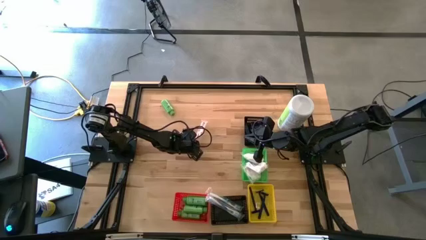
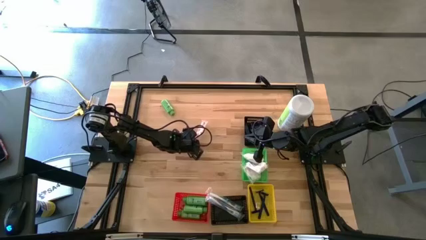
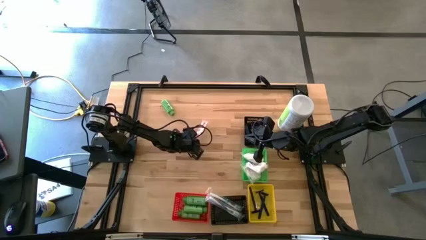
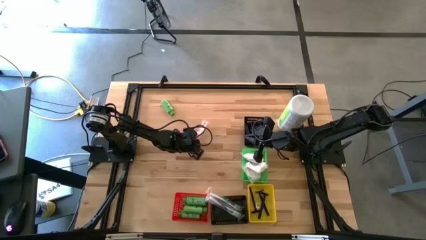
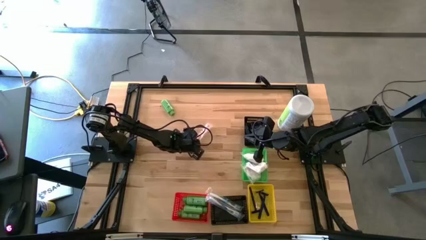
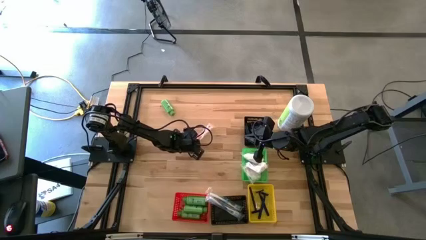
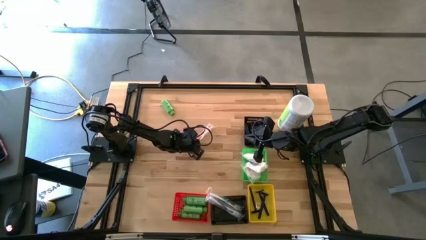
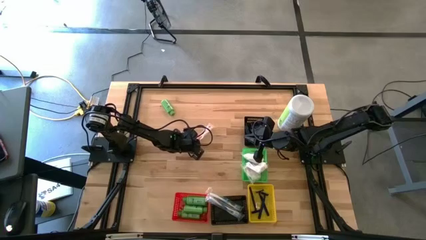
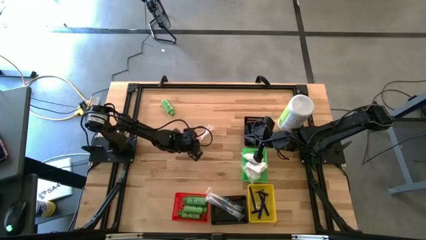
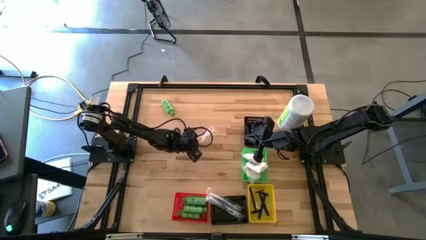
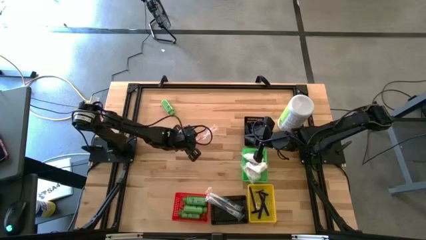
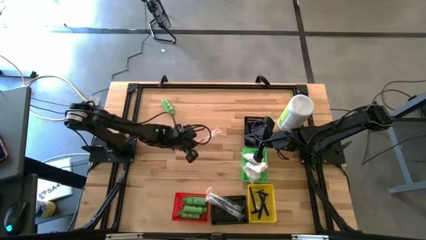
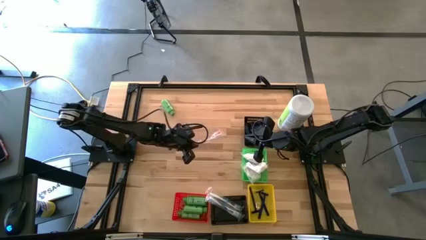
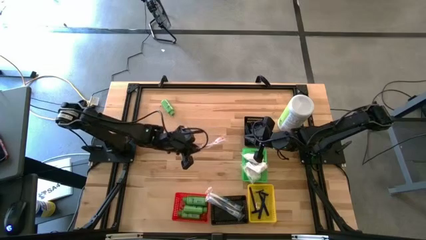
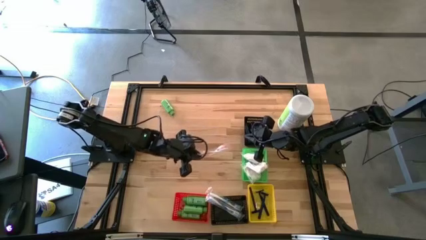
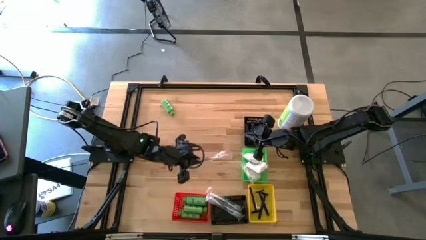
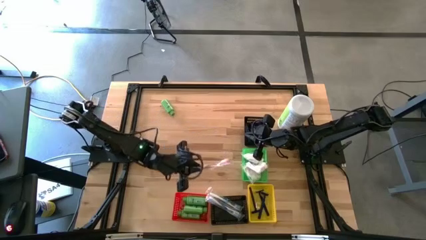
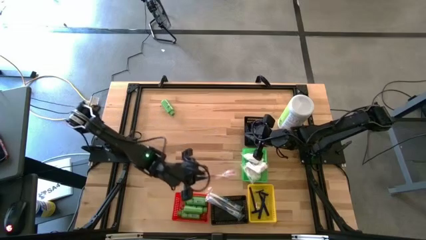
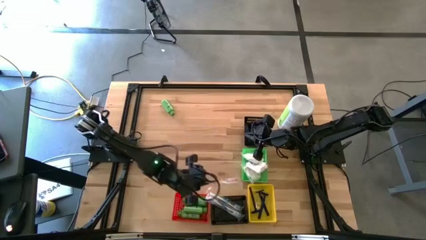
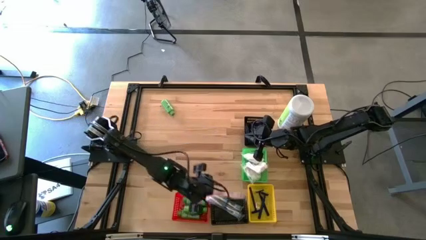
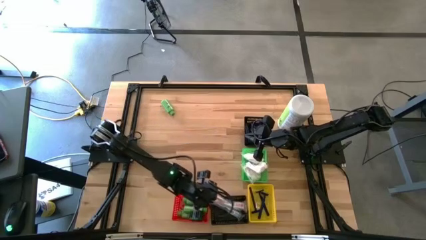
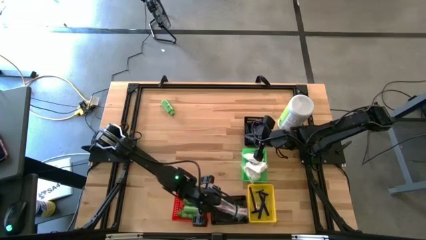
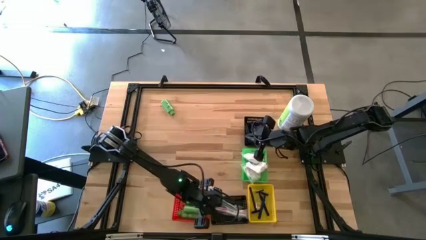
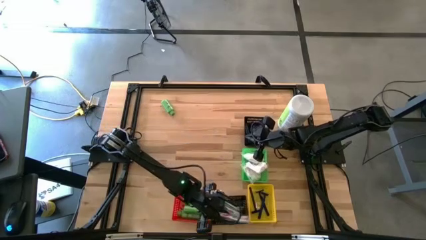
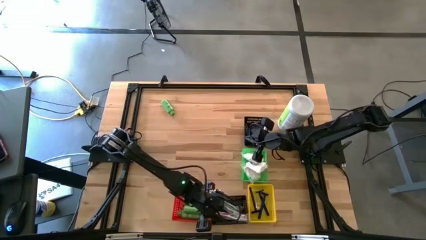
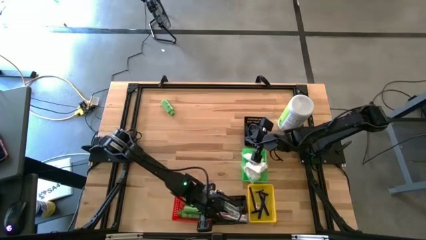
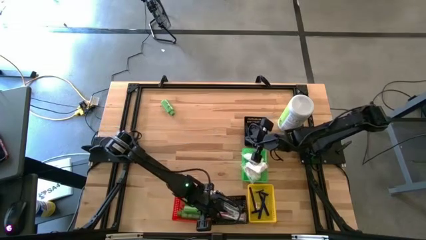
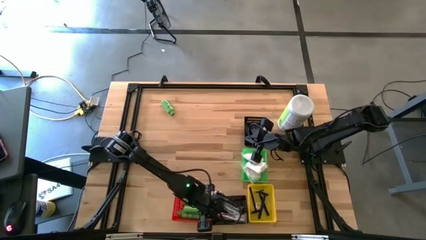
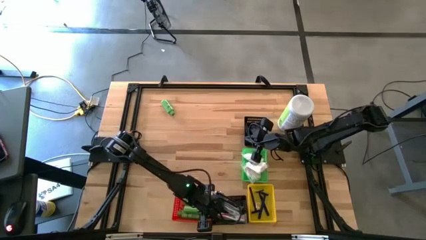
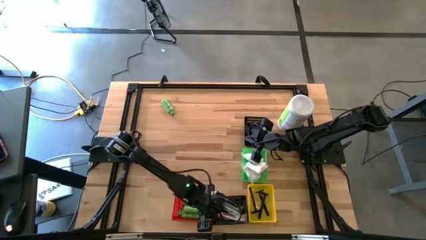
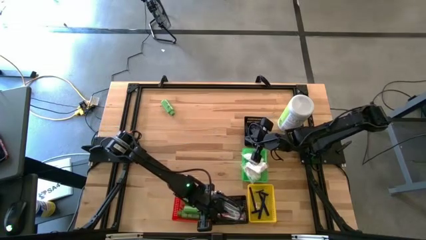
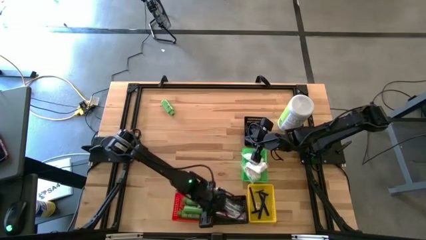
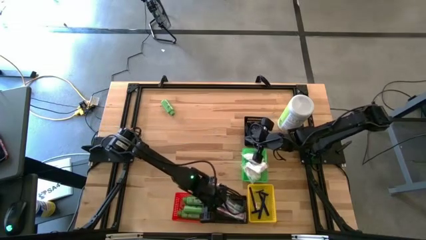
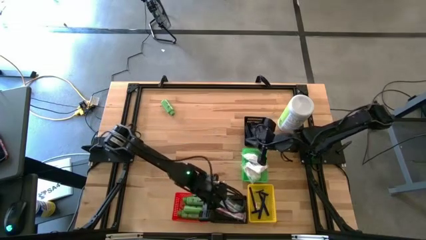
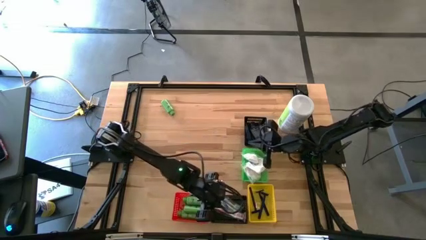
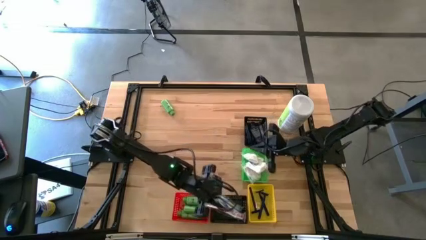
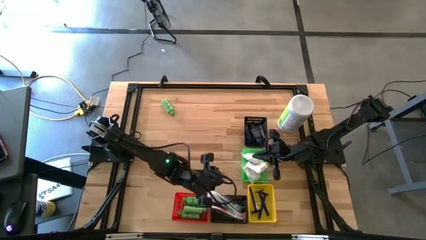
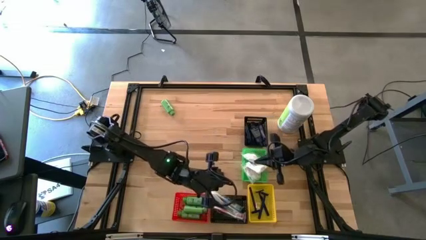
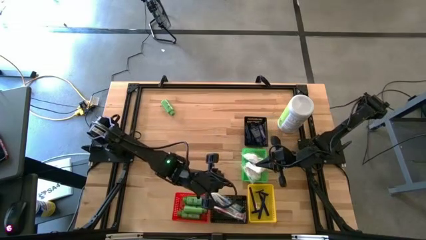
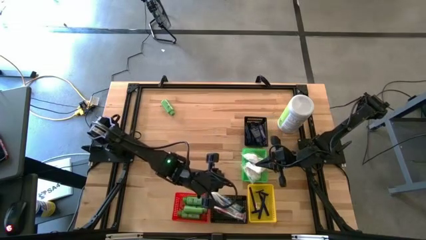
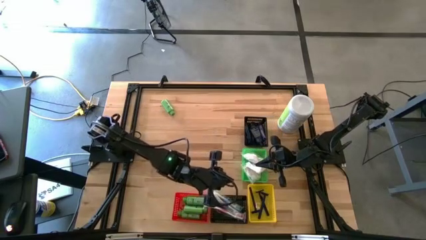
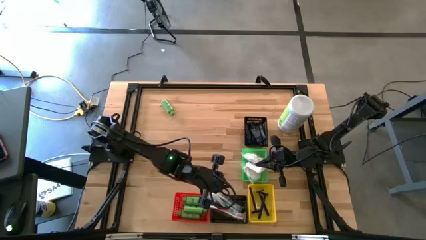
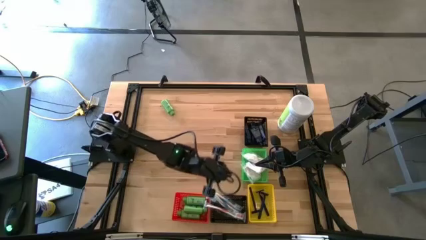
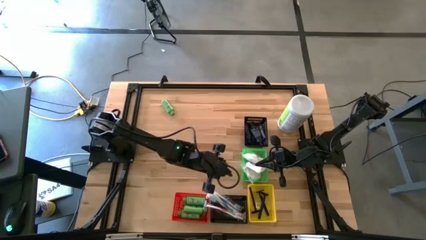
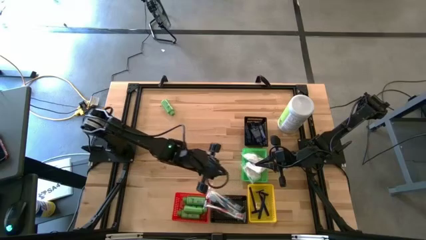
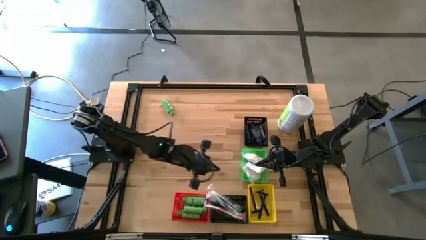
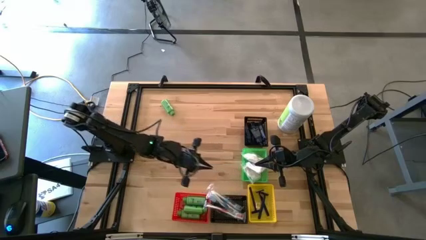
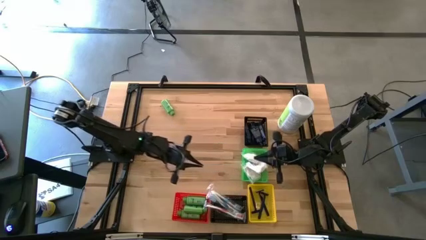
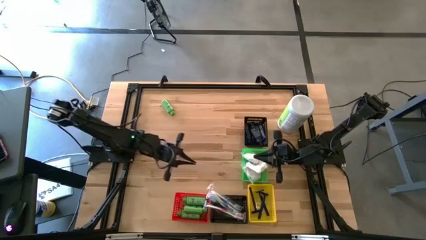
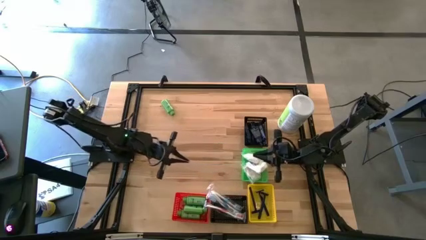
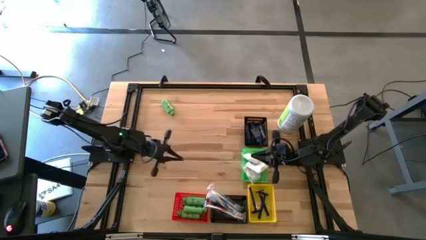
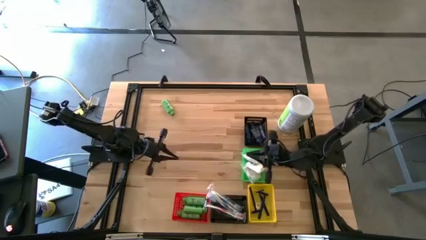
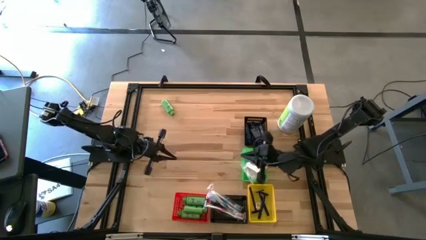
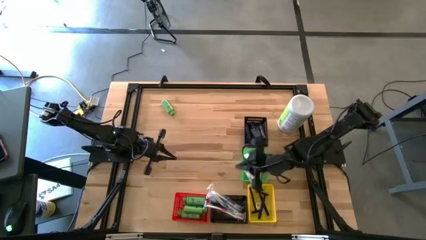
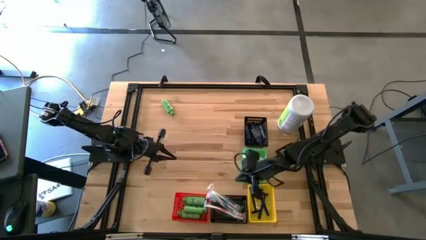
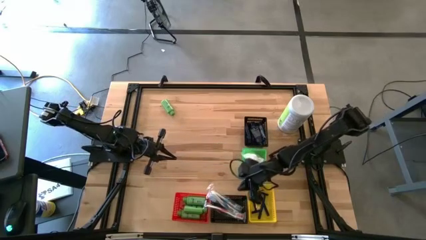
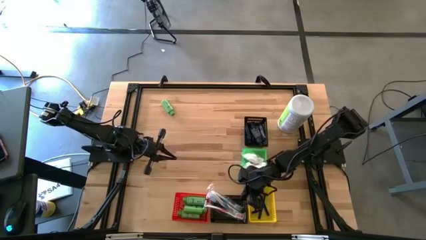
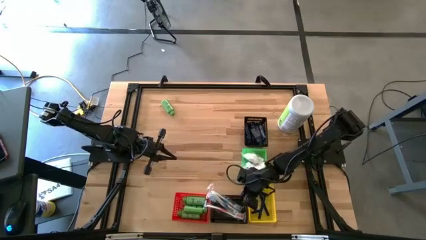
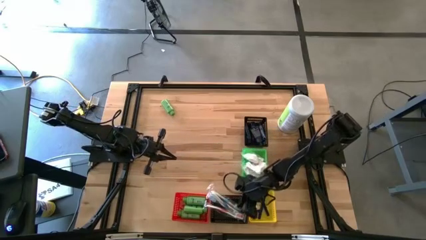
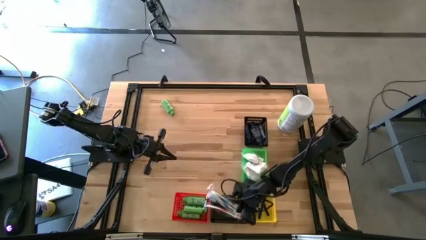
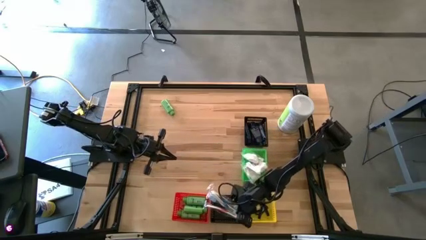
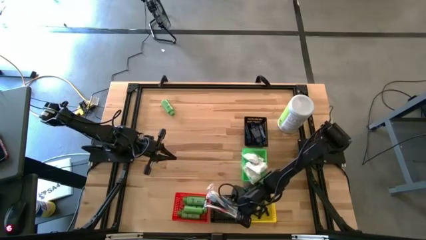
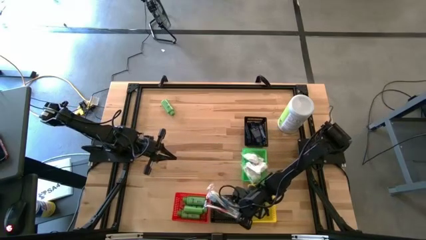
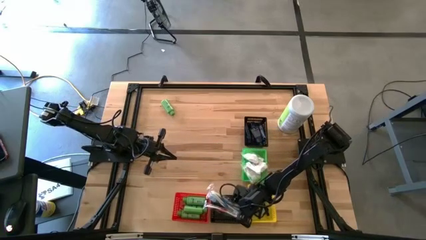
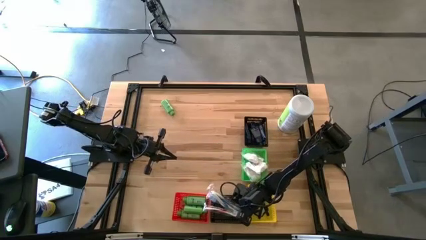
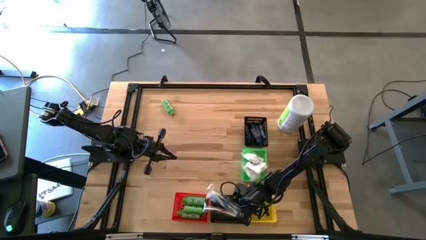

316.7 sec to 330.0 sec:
Task: Pick & Place Travel size toiletries
Put the red toothbrush into the bottom black bin
